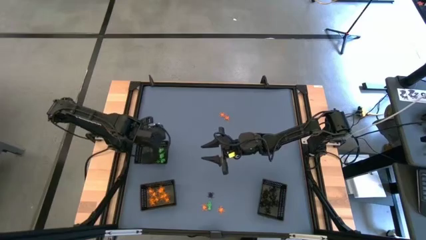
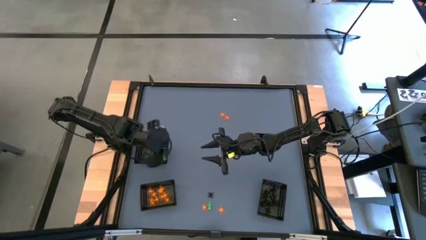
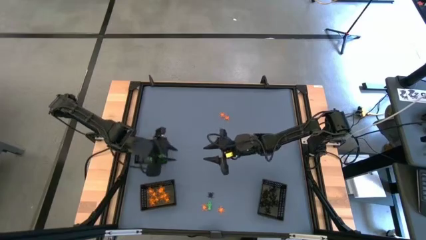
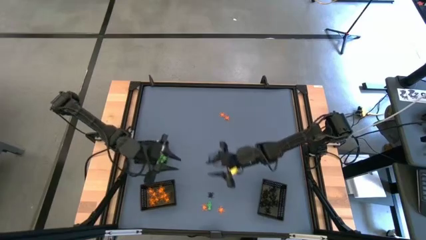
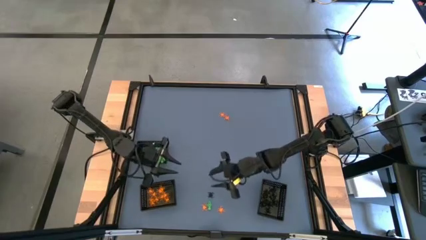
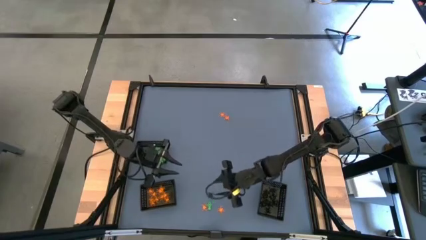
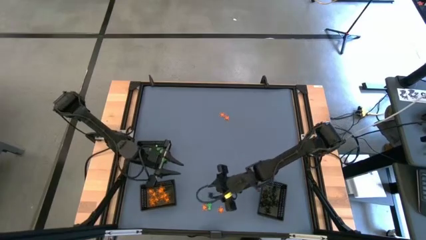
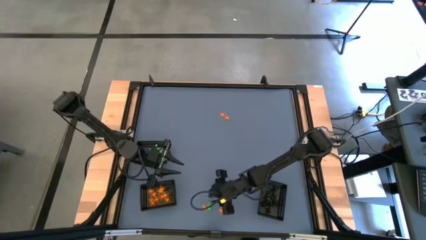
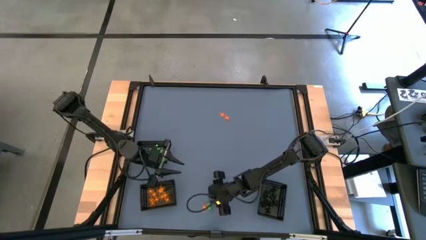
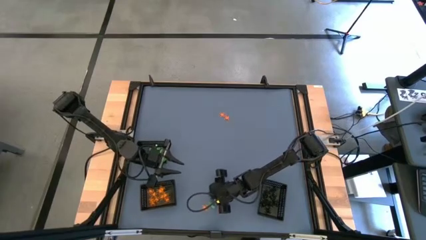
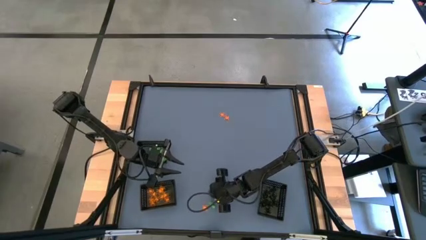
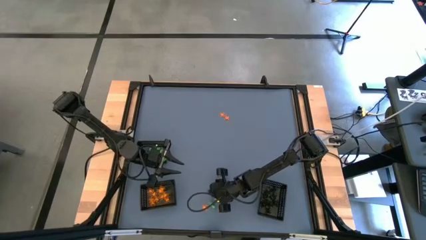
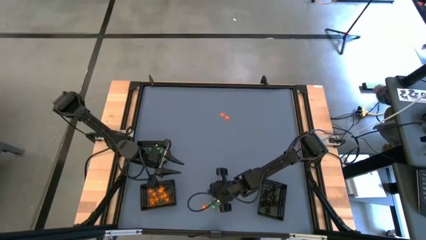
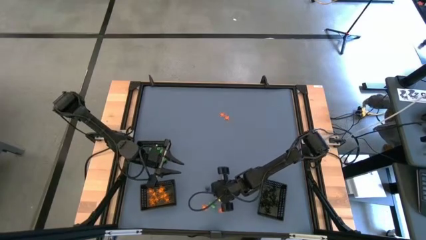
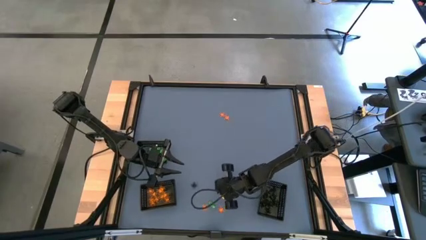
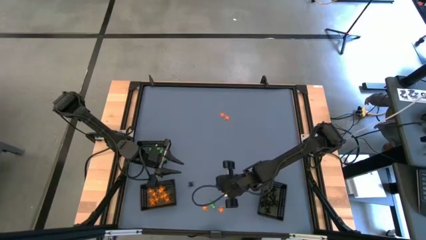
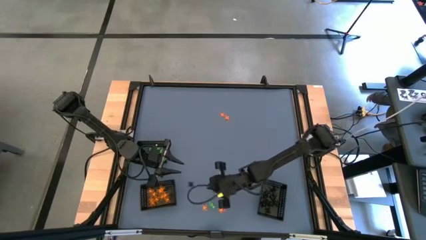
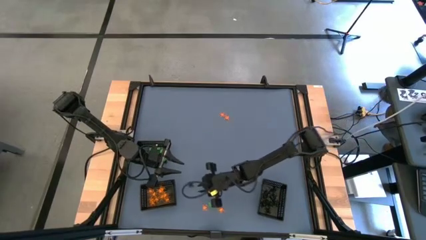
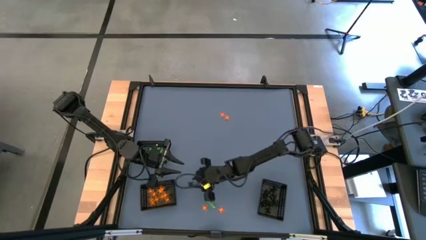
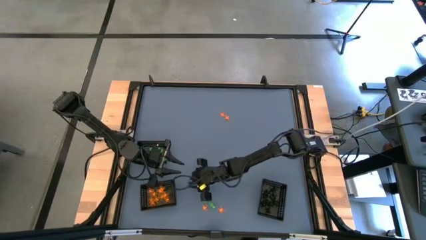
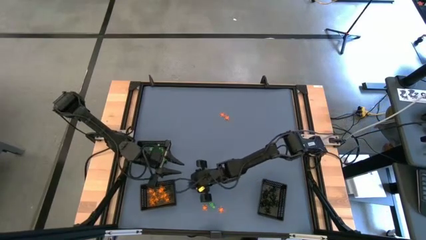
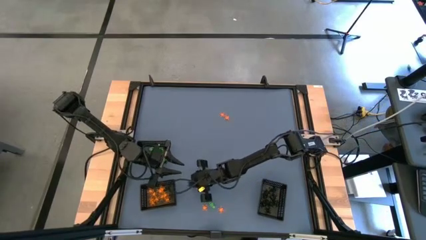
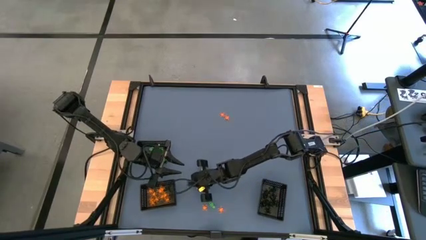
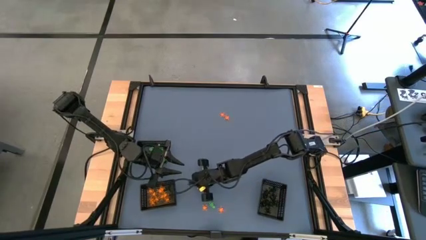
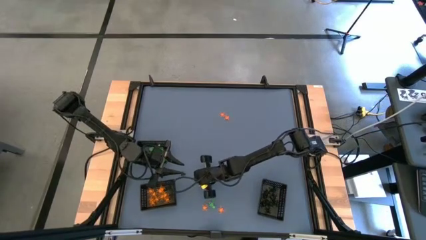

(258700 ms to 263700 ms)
Task: Sort Halloween decoration
Put the black spider toy into the bottom right black bin

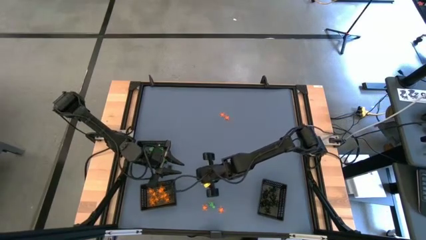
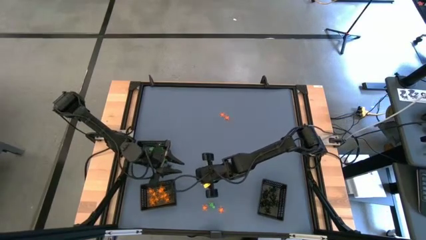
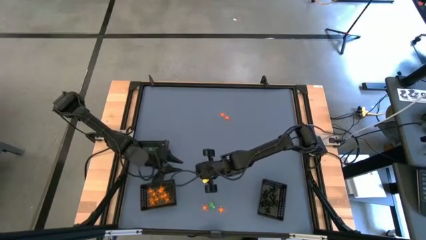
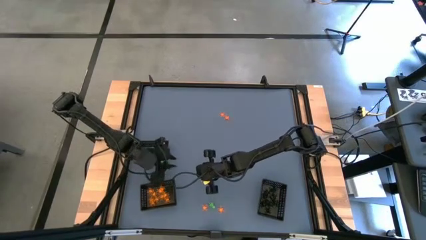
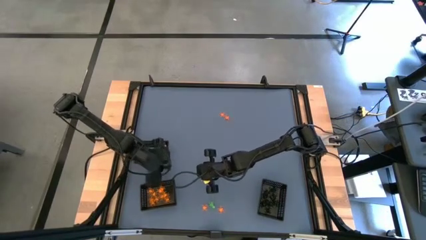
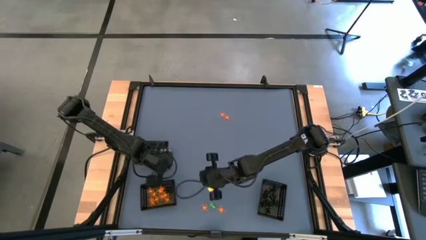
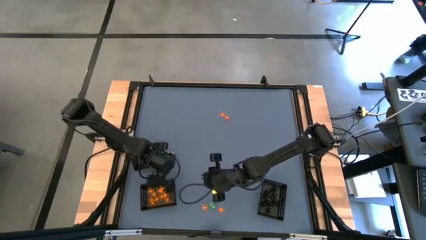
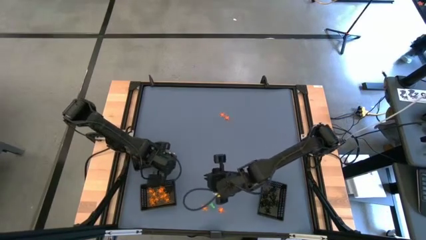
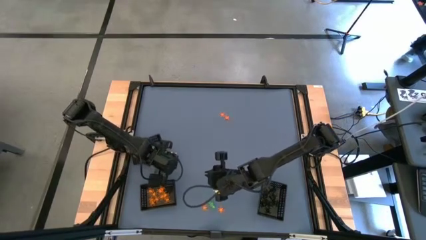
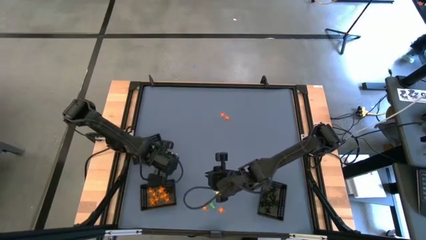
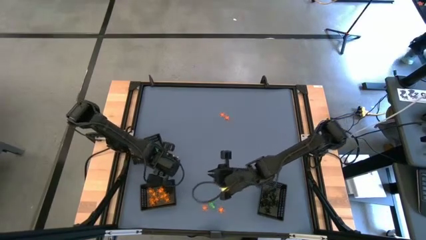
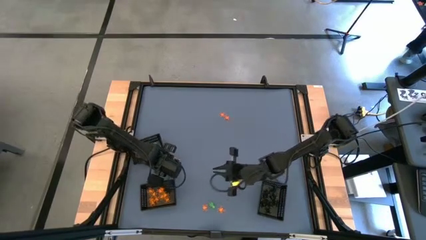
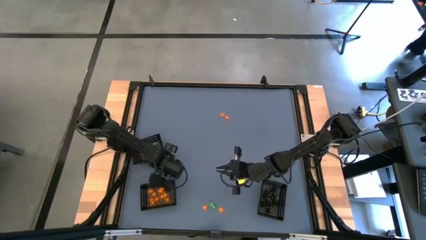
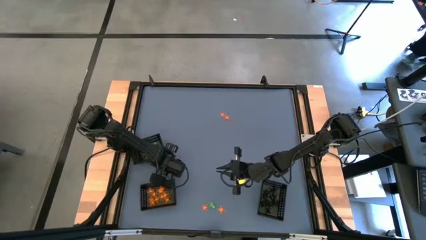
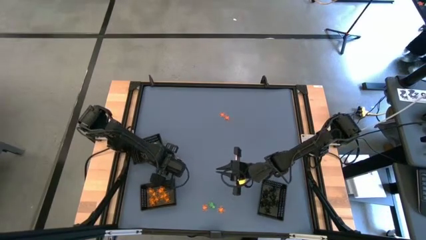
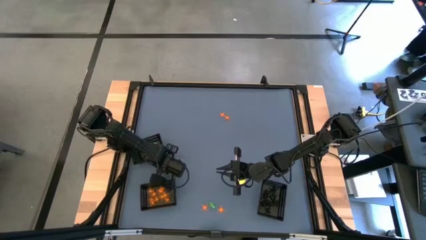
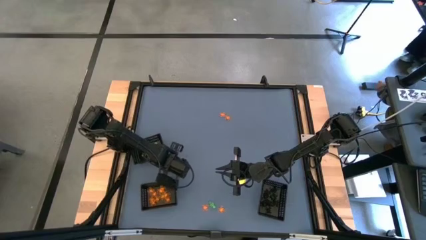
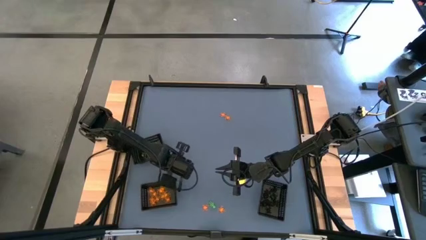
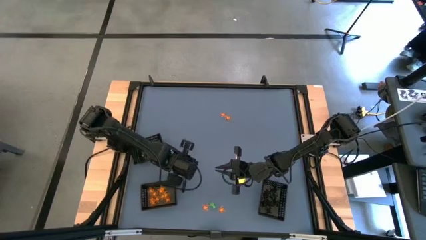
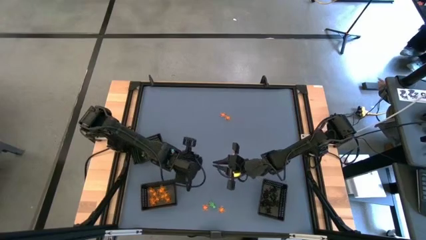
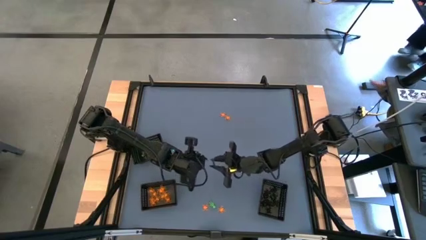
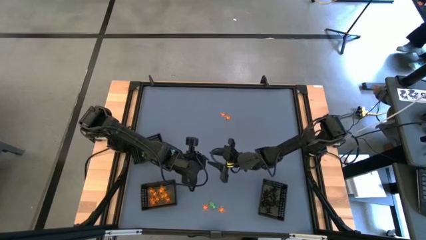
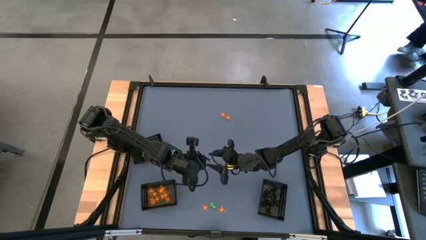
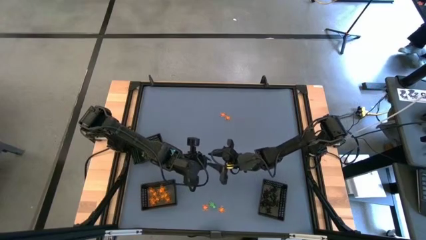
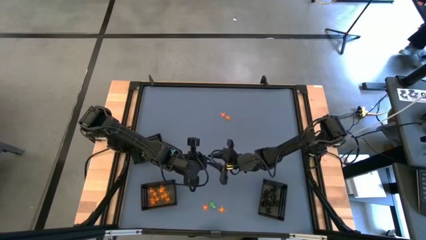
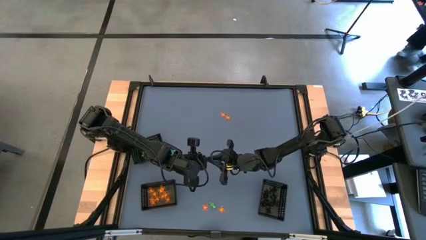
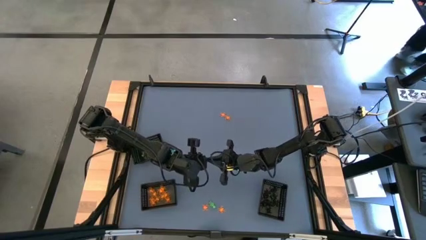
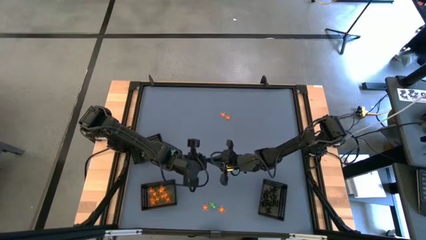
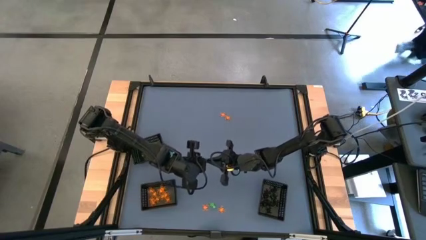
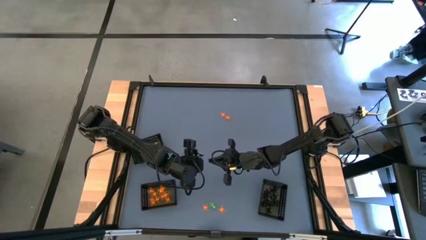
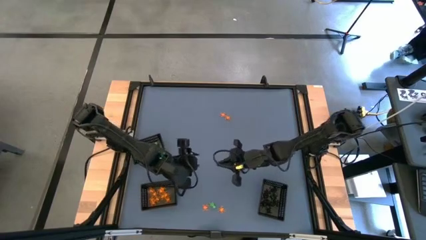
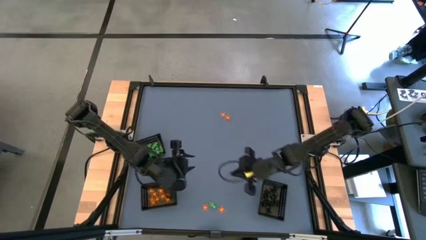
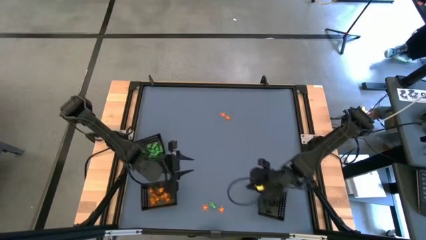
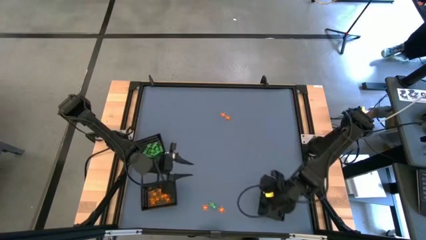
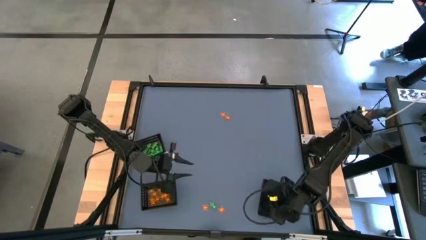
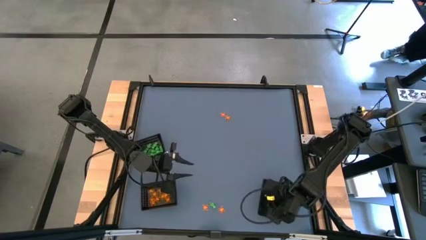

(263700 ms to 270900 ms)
Put the black spider toy into the bottom right black bin

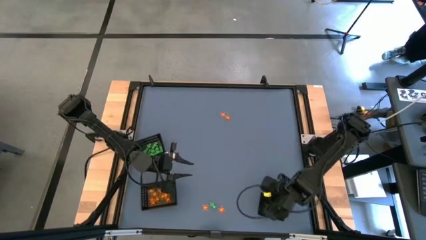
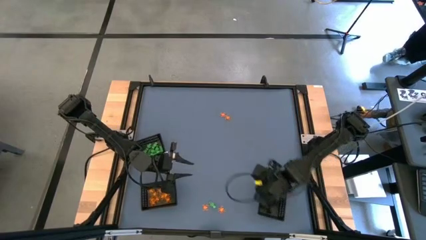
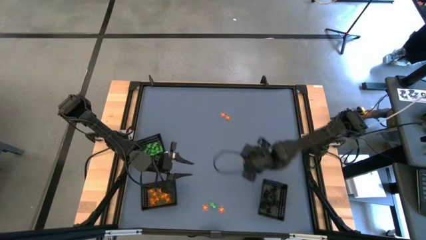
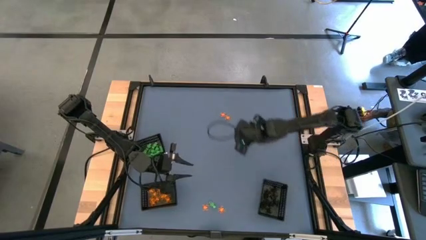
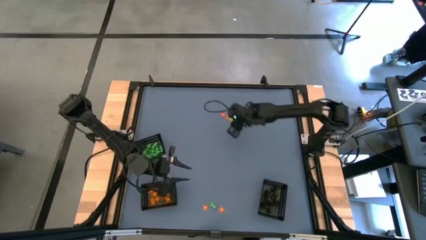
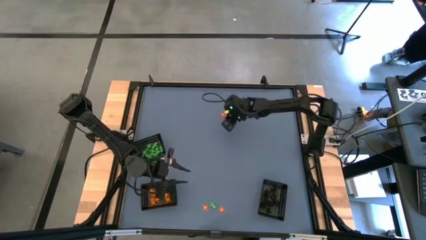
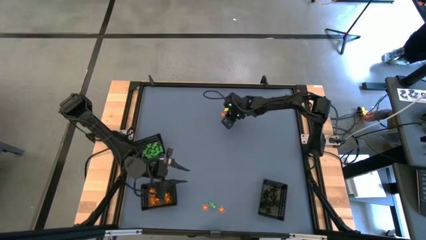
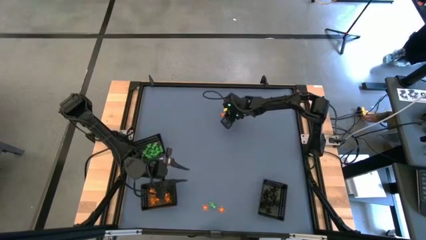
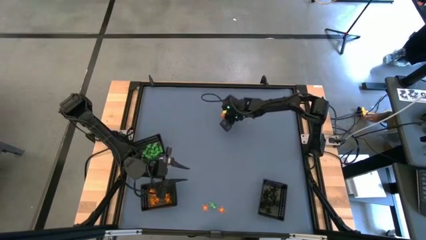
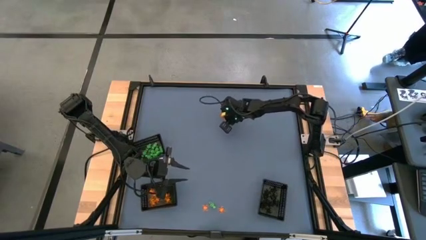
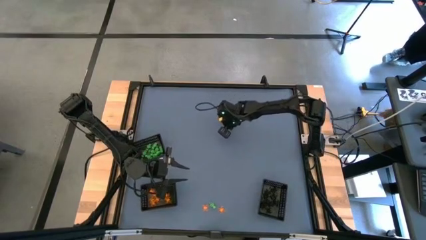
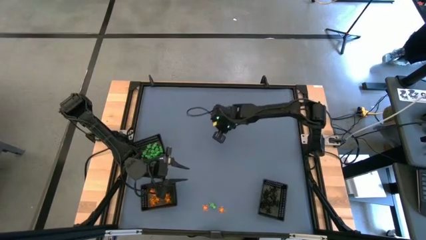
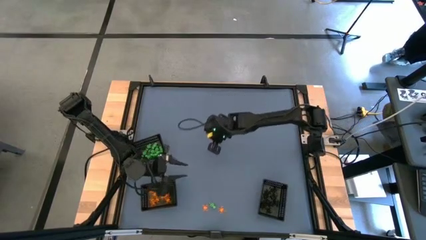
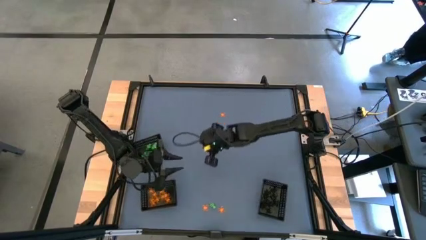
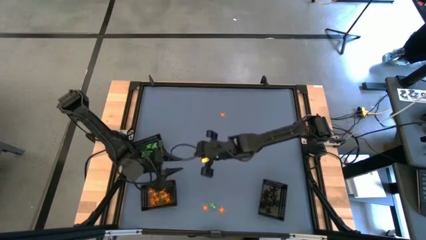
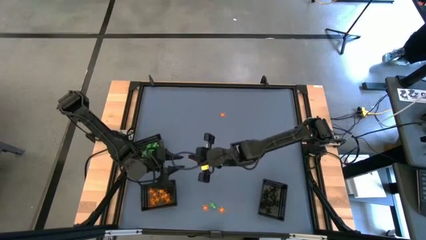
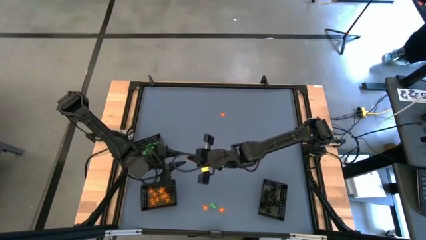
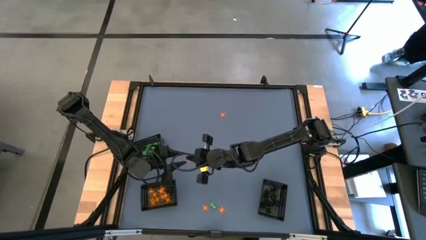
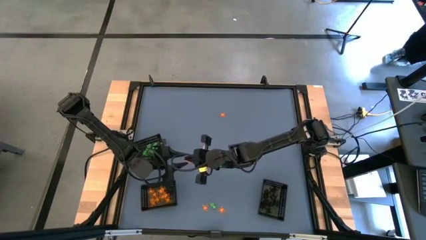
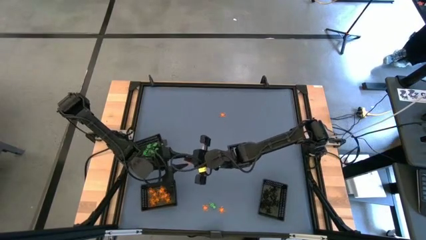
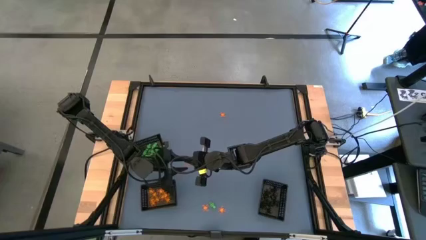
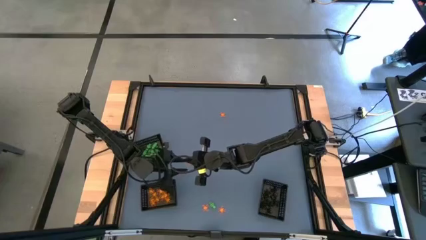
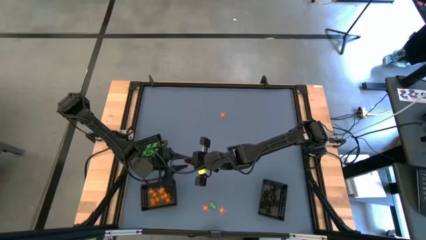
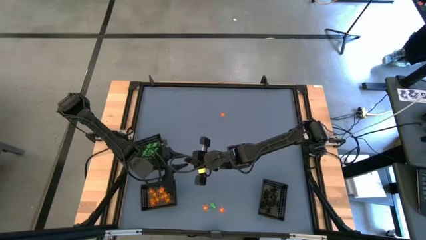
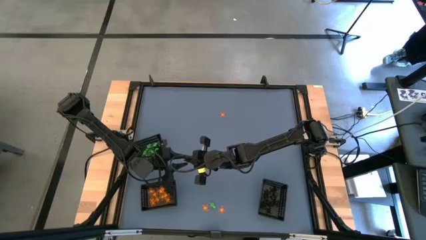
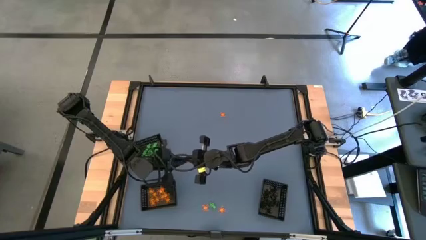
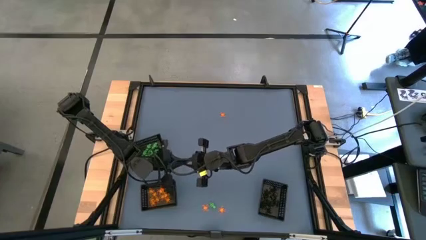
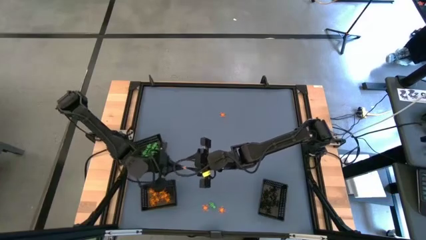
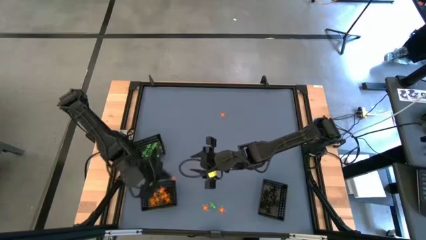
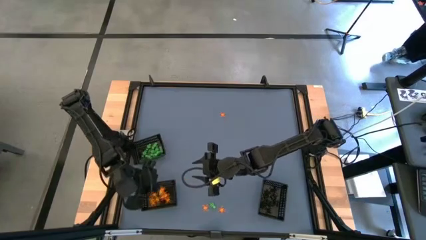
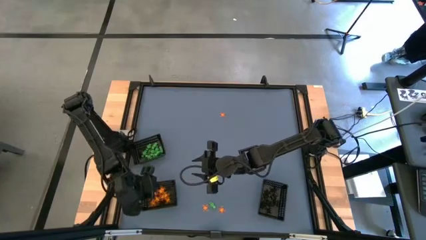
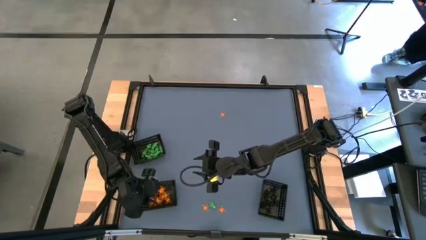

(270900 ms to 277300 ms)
Put the orange spider toy into the bottom left black bin
